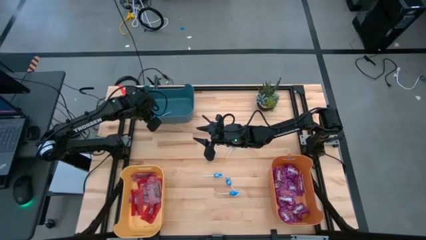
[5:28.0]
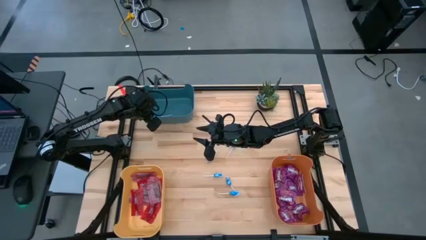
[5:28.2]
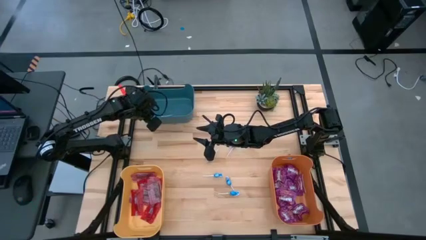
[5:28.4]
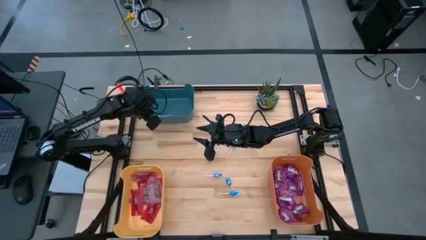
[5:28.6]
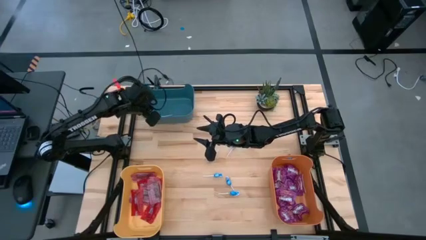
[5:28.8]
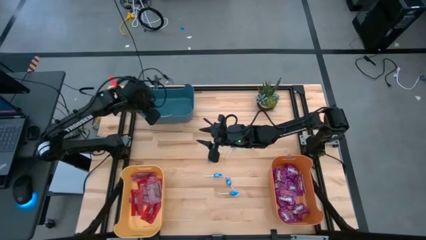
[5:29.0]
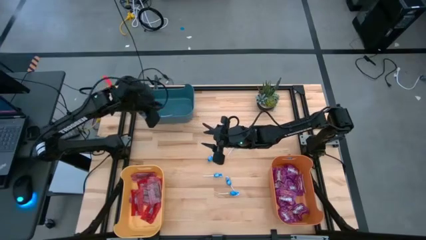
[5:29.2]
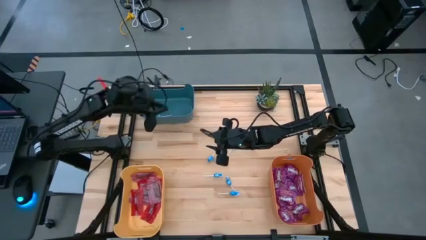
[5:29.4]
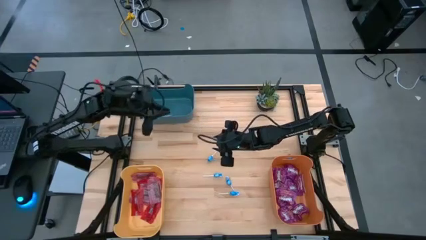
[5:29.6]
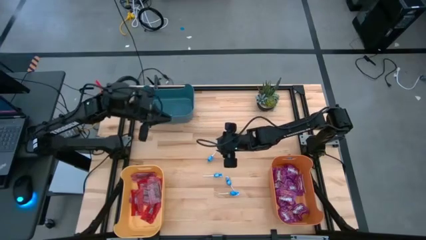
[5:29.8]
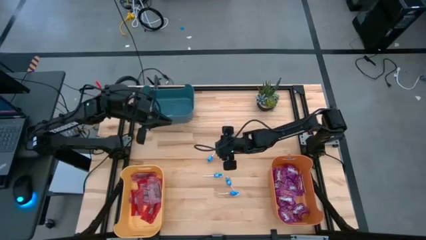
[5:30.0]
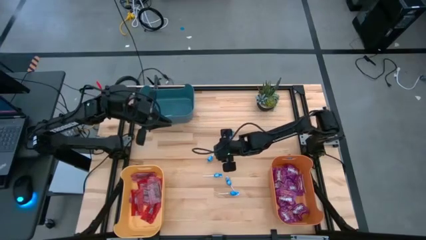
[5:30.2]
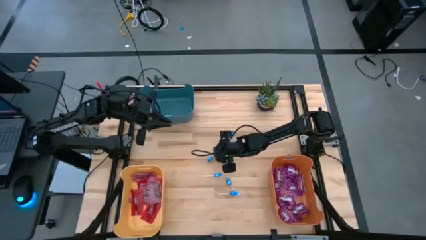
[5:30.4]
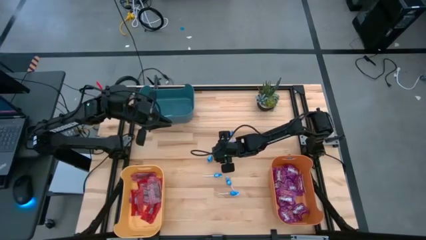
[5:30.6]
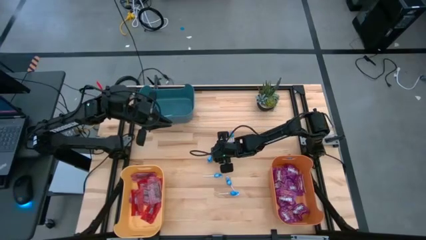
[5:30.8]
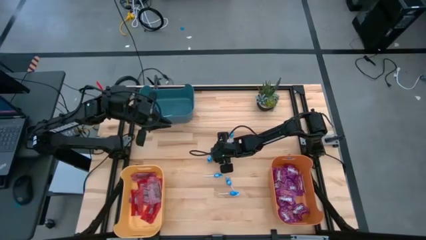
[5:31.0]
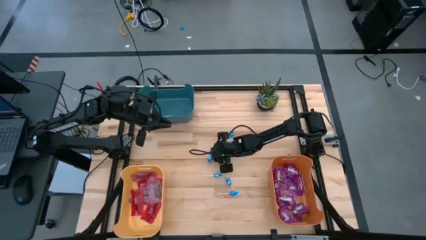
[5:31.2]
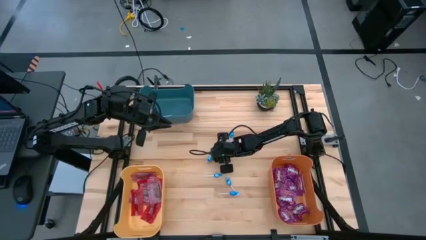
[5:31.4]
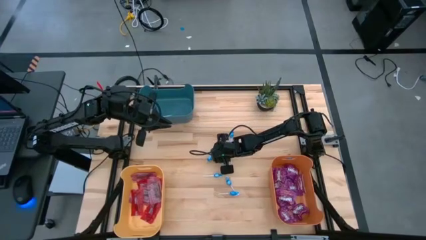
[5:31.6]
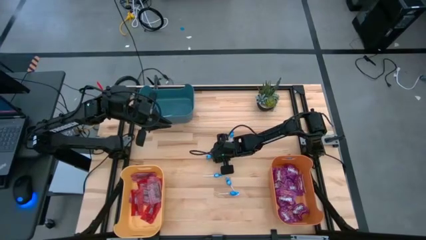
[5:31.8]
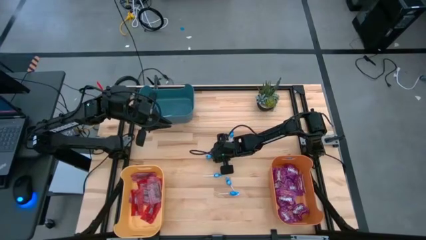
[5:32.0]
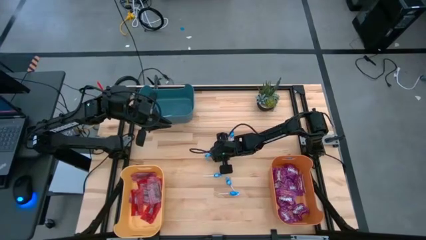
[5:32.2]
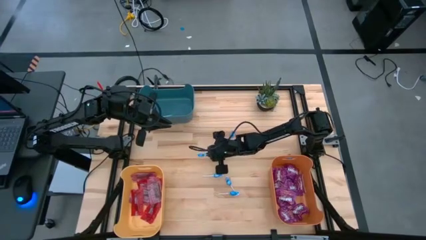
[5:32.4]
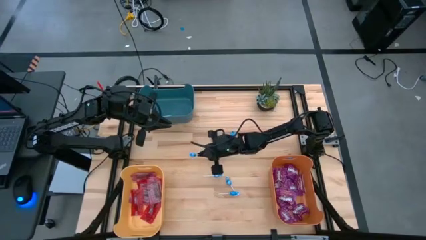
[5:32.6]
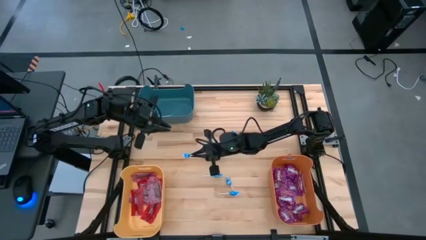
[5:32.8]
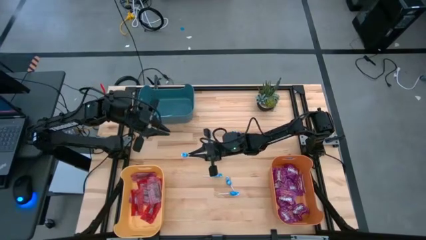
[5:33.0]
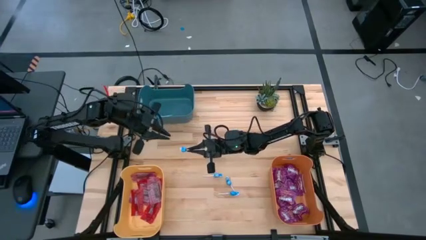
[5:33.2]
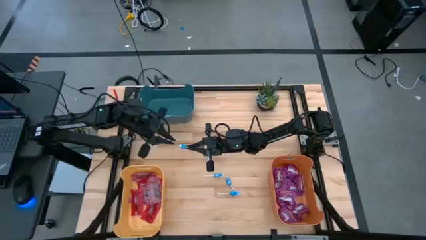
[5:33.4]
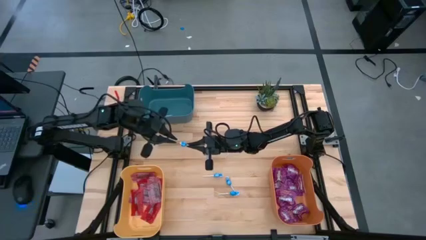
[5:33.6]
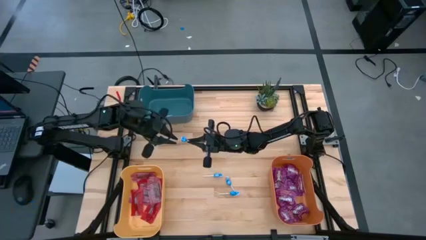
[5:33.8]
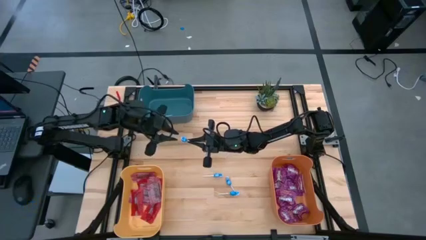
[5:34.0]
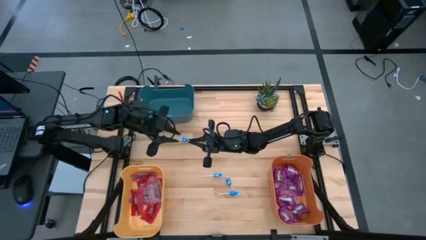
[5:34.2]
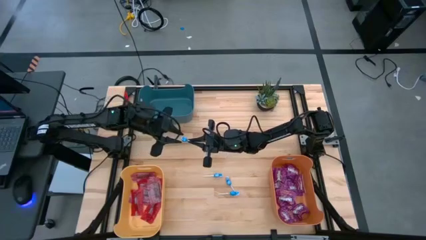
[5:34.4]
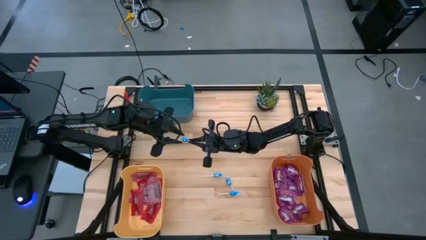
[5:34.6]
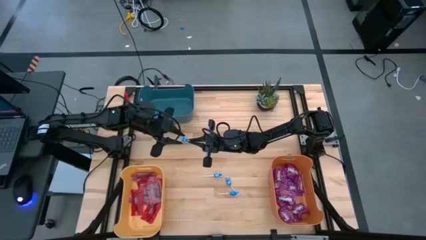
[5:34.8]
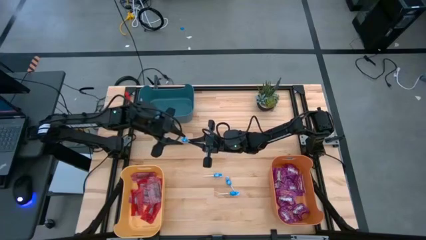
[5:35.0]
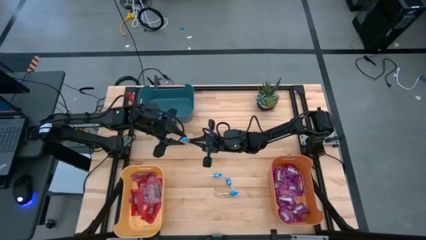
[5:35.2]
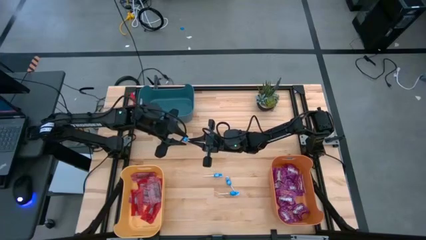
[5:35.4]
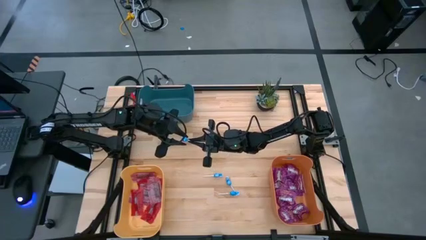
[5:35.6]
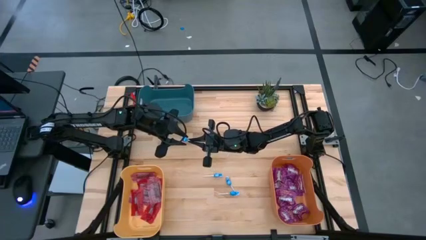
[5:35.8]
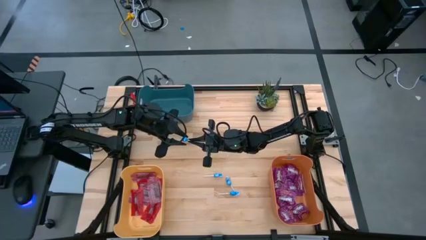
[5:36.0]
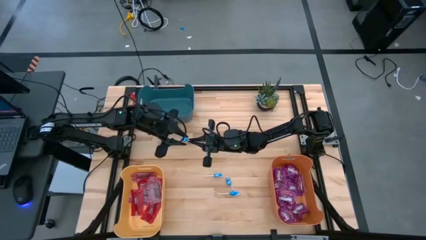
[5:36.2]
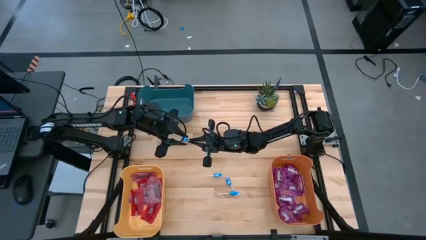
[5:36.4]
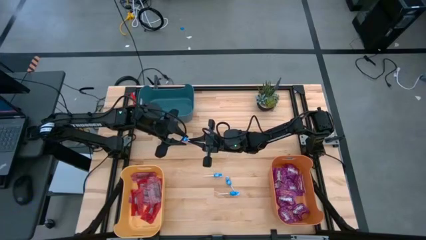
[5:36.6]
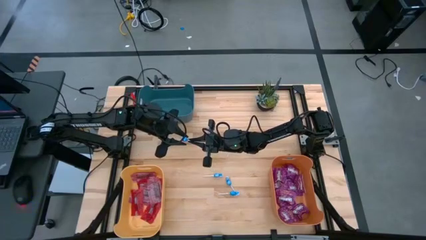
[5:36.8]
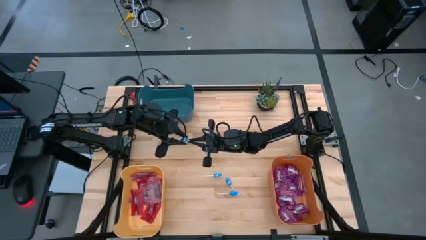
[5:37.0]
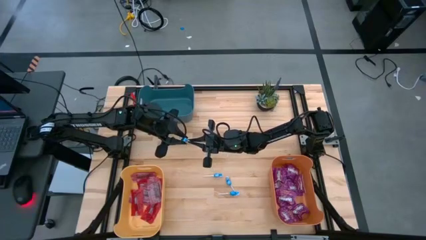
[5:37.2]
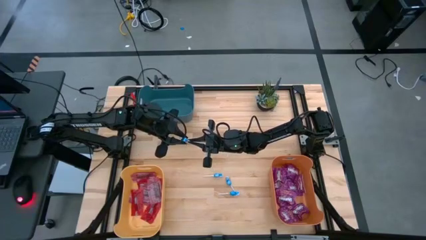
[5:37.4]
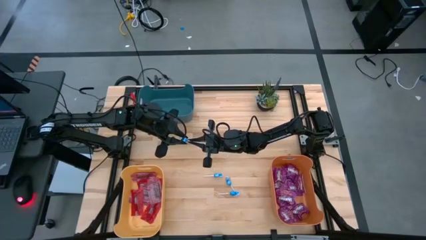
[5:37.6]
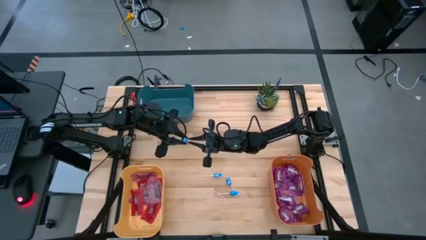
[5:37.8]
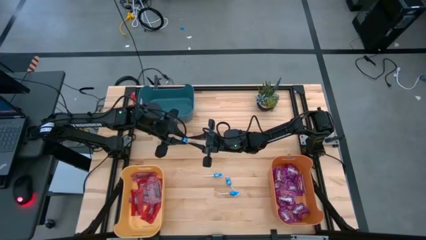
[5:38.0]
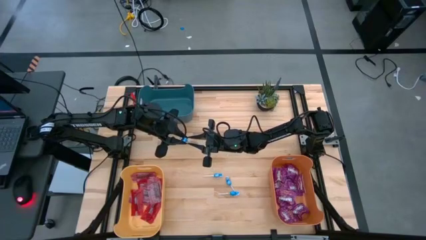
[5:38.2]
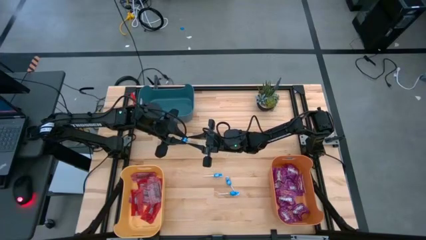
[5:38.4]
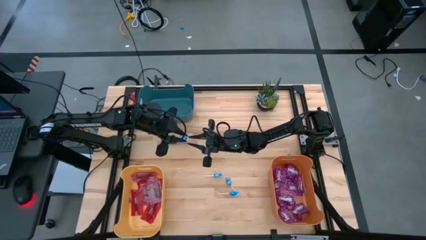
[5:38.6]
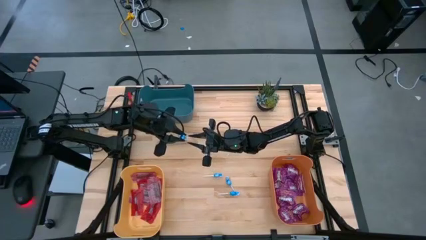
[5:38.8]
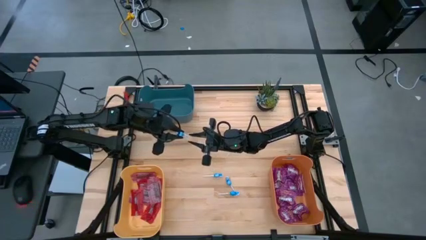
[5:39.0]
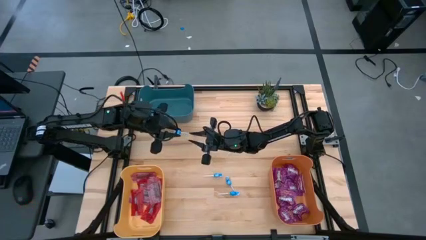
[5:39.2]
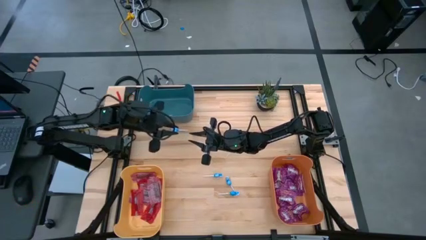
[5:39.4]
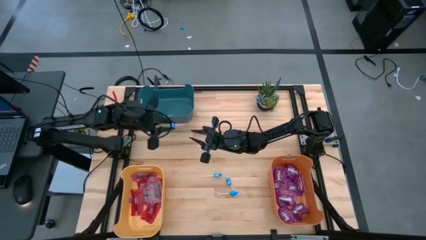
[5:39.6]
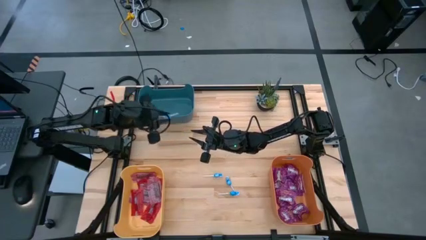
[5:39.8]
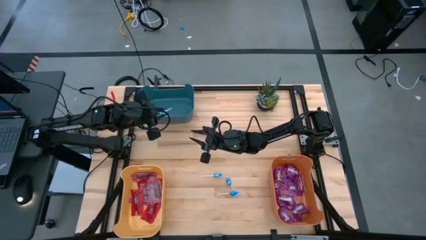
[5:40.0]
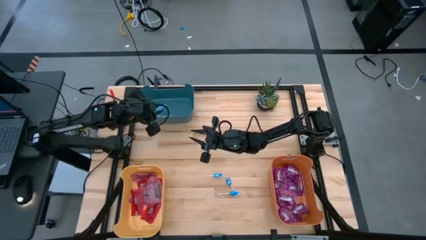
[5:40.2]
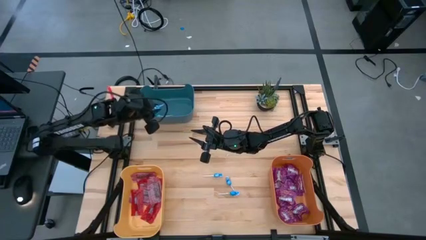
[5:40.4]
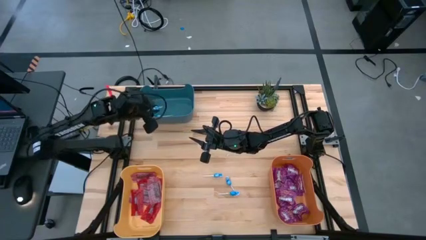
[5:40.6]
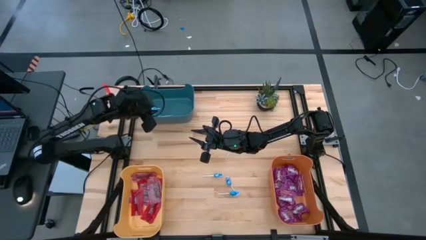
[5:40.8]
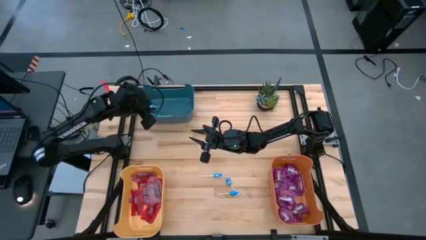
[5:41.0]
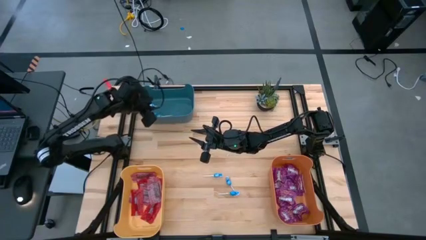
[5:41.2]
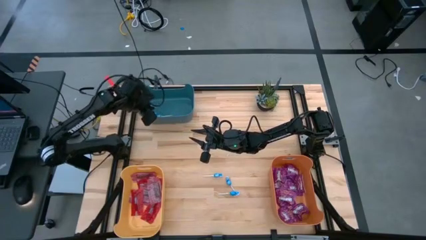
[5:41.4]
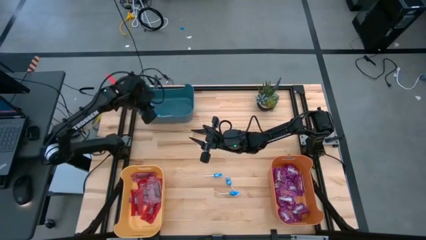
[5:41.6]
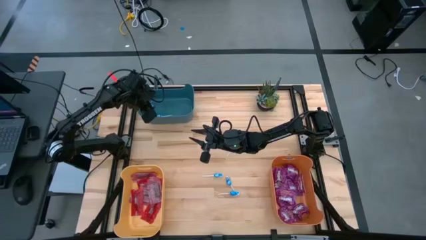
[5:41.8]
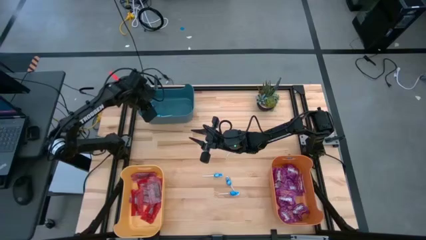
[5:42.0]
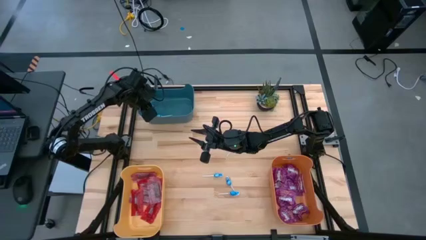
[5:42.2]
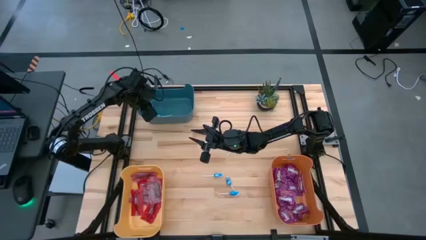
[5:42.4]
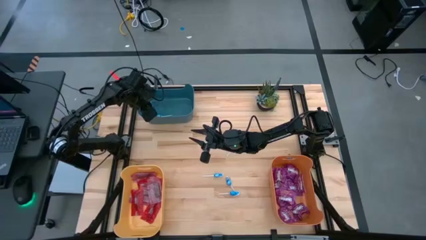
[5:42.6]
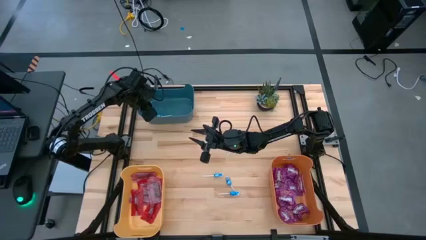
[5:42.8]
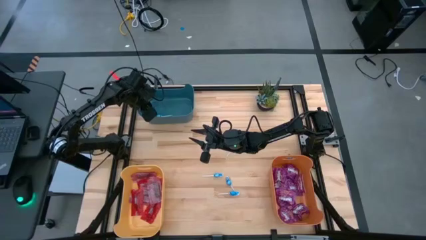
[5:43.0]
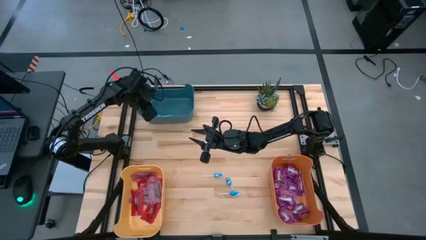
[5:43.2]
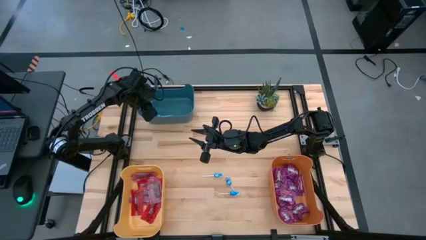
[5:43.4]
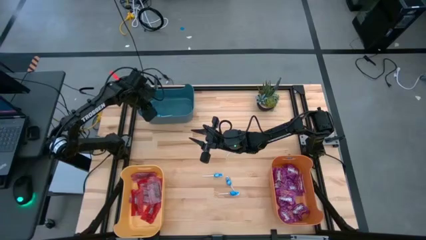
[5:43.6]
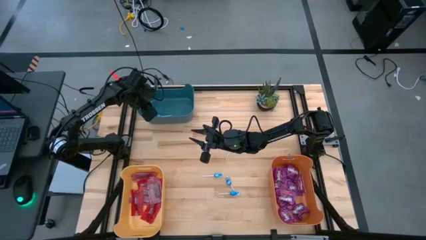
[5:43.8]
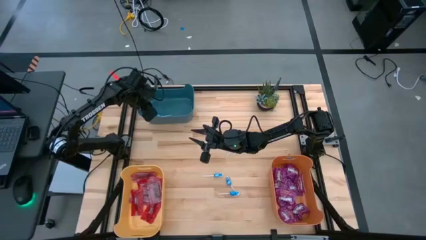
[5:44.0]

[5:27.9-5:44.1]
Task: Sort candy
Put the blue candy into the blue bin

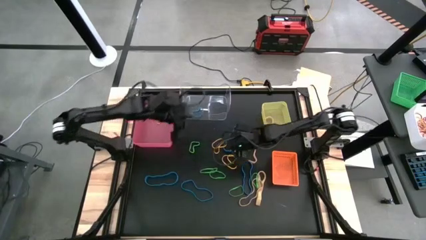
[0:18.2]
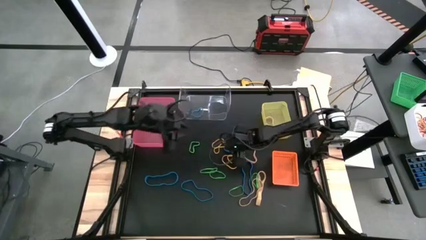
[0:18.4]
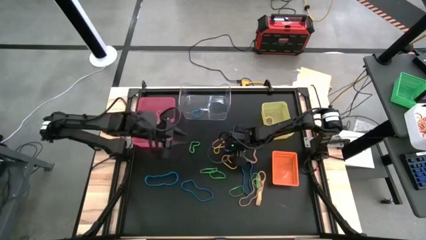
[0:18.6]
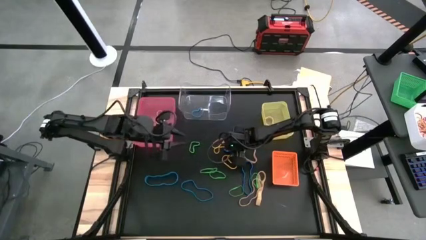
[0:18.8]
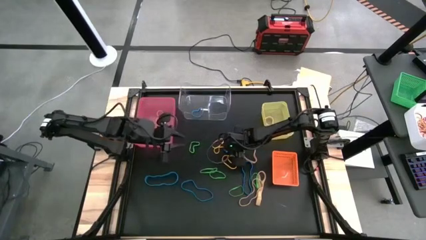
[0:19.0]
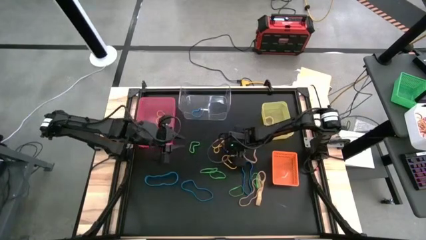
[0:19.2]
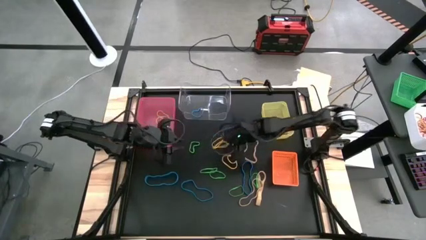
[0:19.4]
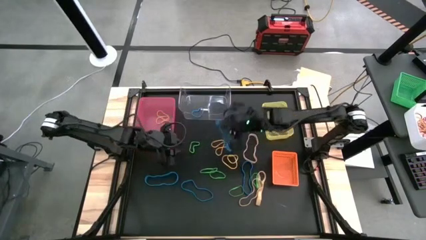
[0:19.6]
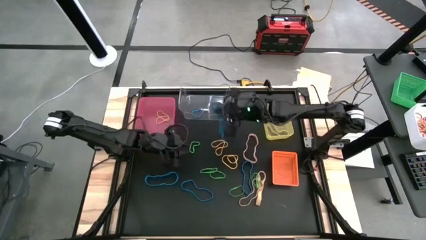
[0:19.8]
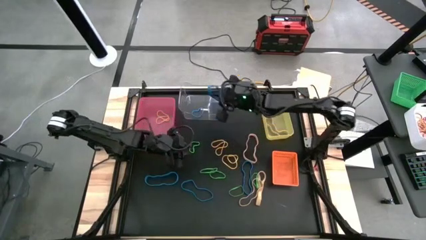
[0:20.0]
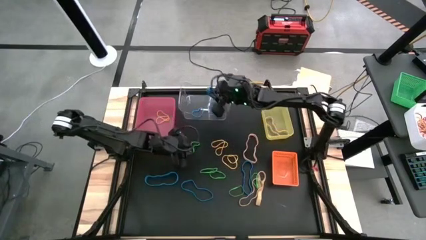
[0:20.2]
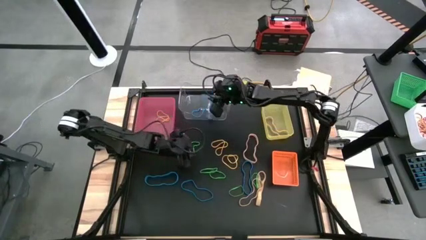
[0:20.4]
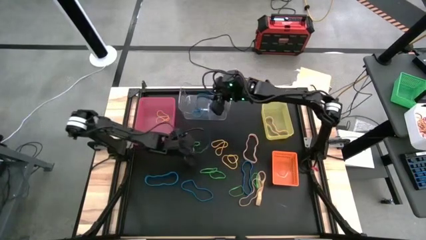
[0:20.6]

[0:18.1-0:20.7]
Task: Sort rubber bands into baskets
Put the blue rubber band into the transparent bin
